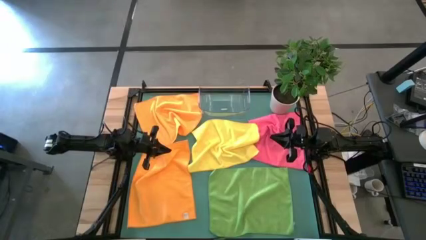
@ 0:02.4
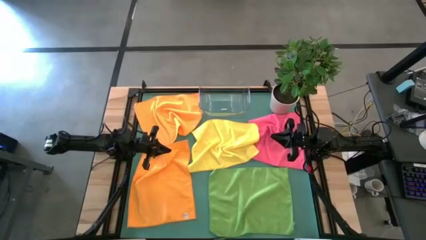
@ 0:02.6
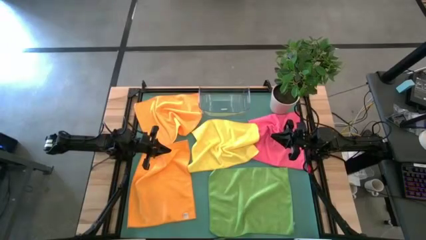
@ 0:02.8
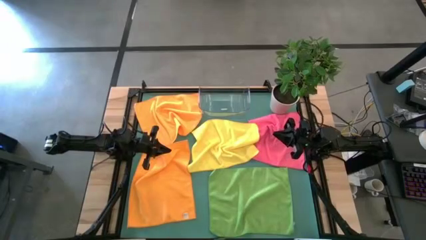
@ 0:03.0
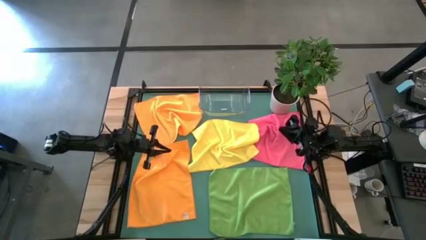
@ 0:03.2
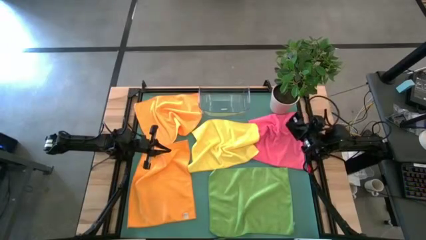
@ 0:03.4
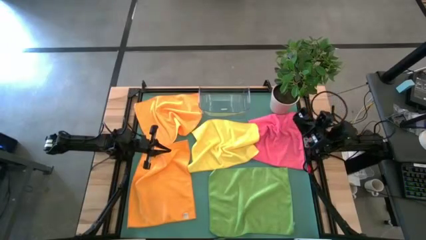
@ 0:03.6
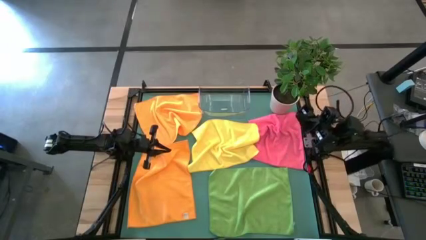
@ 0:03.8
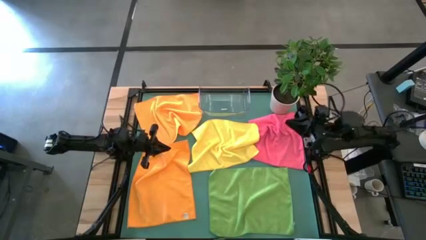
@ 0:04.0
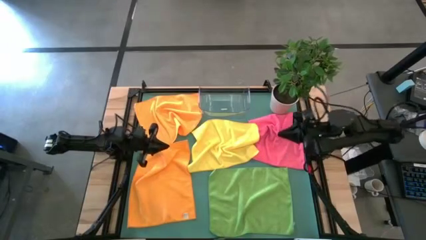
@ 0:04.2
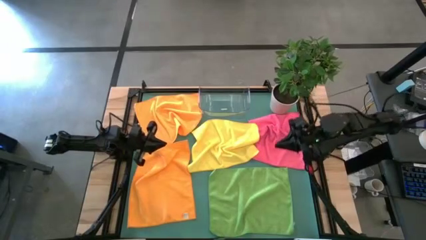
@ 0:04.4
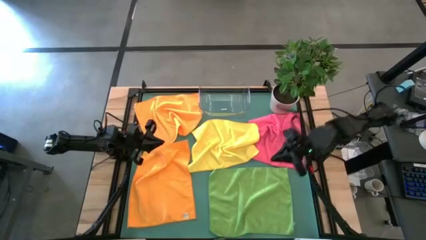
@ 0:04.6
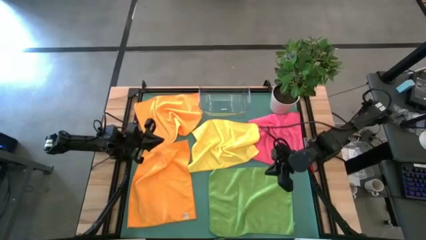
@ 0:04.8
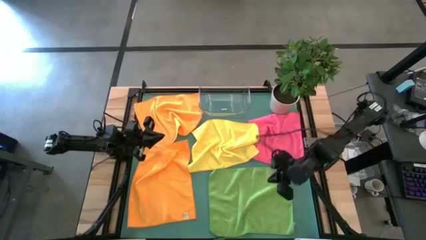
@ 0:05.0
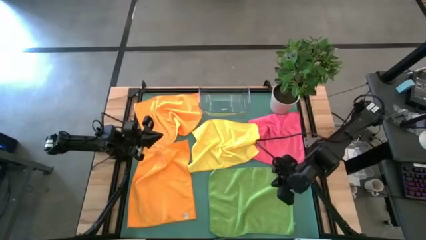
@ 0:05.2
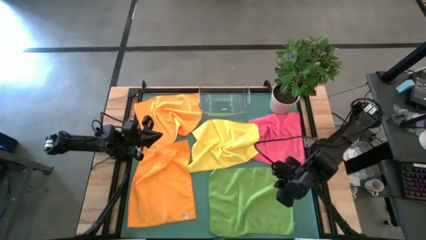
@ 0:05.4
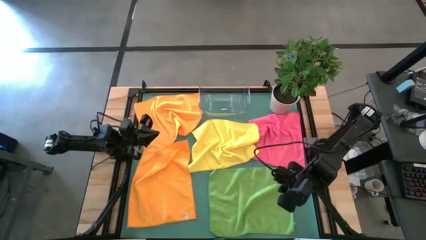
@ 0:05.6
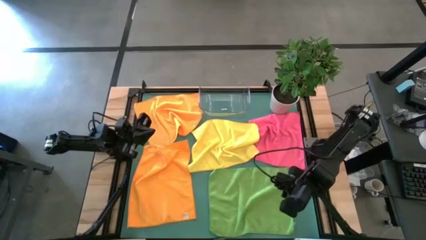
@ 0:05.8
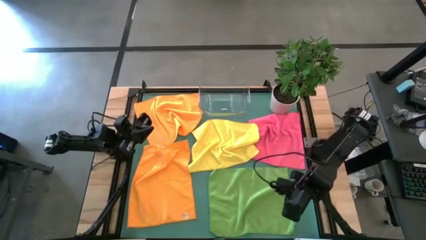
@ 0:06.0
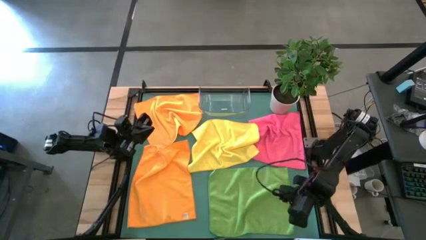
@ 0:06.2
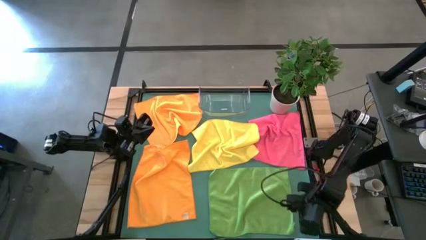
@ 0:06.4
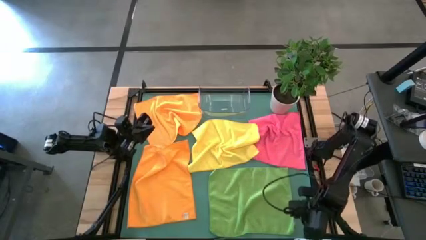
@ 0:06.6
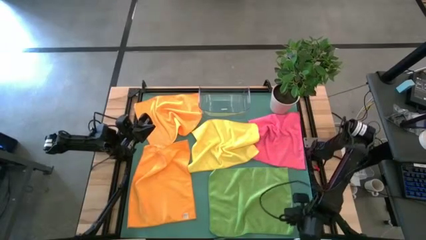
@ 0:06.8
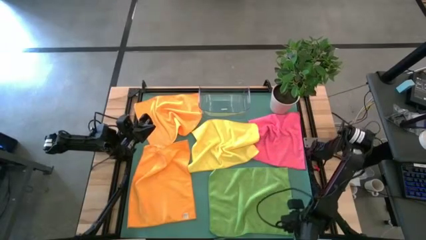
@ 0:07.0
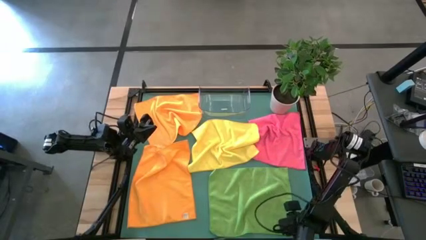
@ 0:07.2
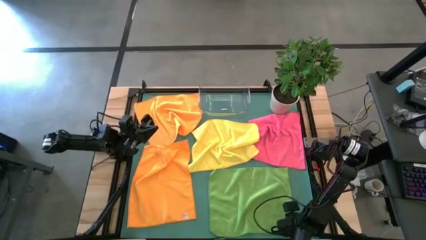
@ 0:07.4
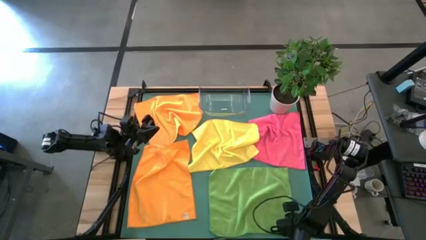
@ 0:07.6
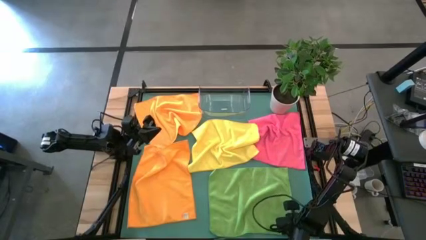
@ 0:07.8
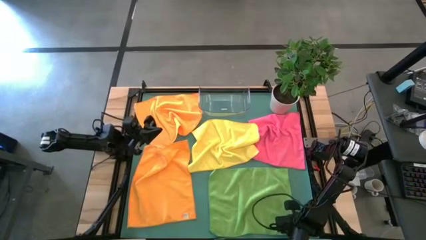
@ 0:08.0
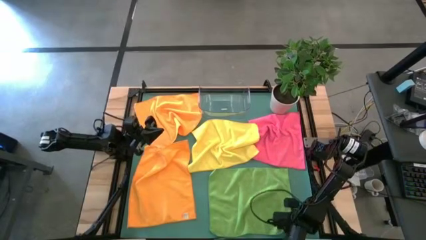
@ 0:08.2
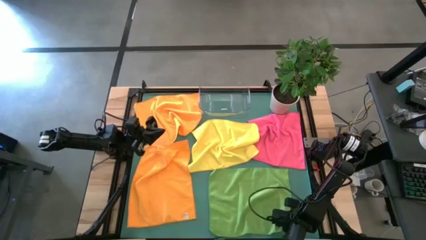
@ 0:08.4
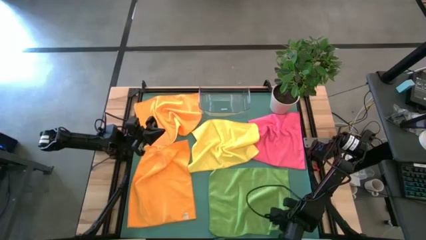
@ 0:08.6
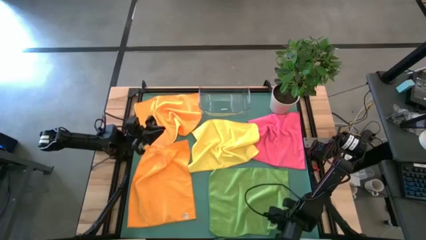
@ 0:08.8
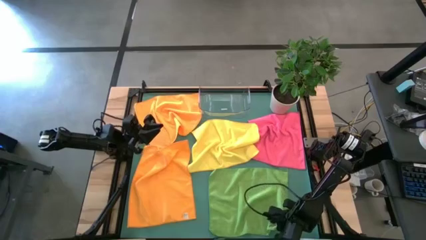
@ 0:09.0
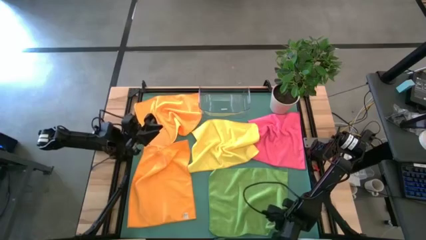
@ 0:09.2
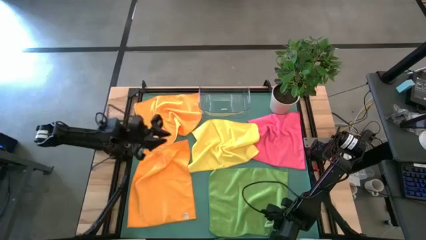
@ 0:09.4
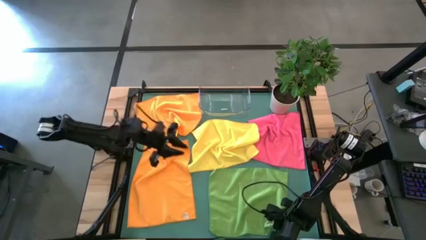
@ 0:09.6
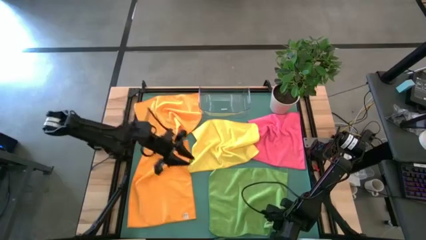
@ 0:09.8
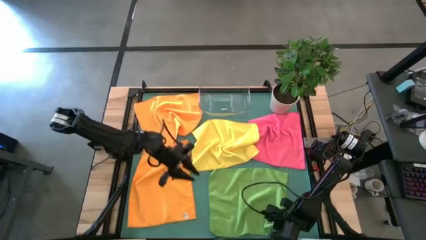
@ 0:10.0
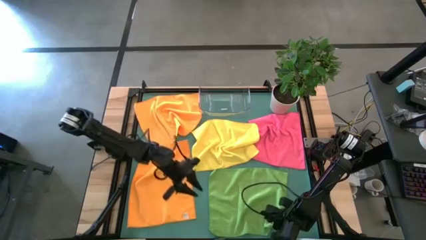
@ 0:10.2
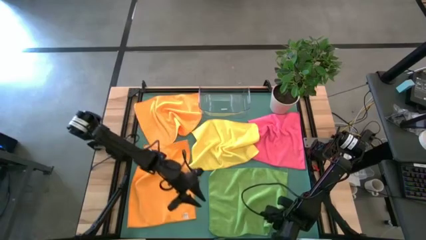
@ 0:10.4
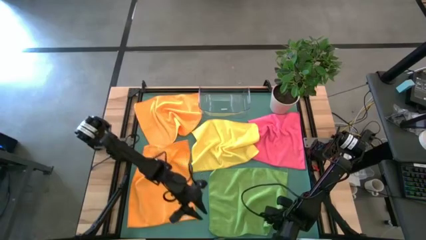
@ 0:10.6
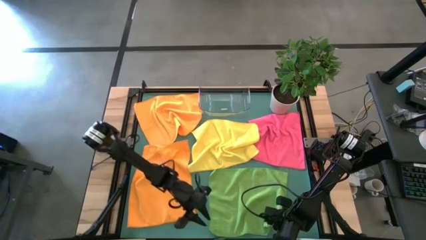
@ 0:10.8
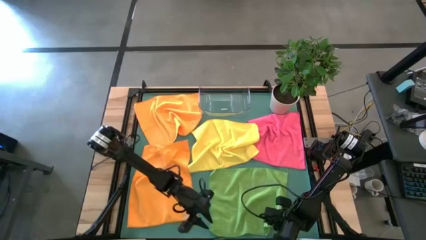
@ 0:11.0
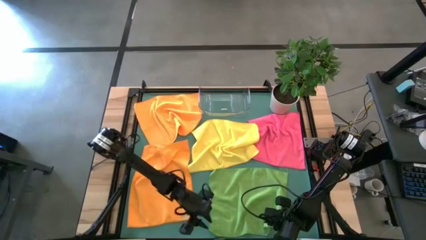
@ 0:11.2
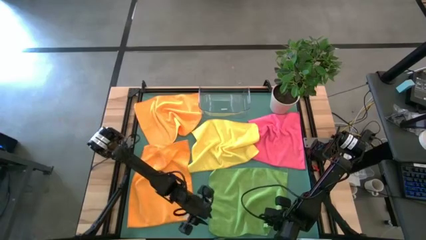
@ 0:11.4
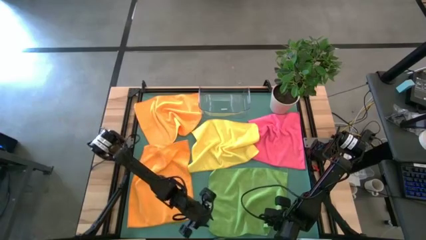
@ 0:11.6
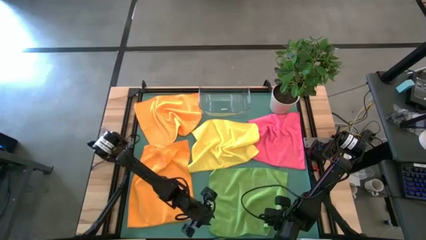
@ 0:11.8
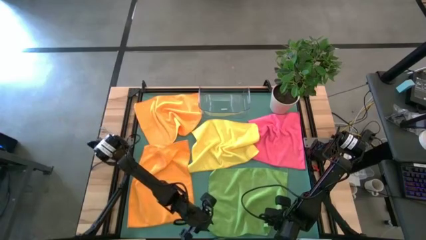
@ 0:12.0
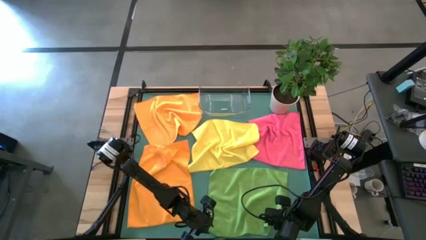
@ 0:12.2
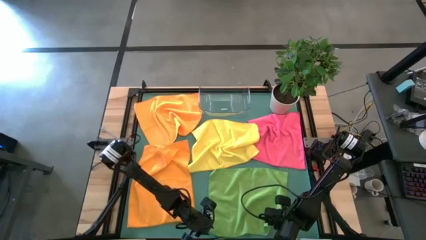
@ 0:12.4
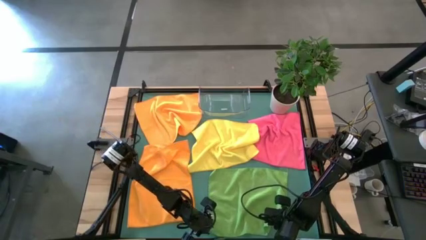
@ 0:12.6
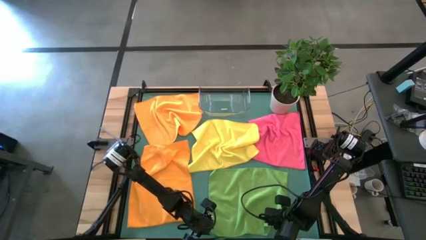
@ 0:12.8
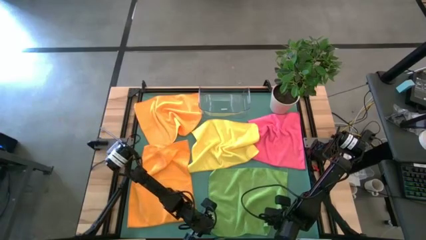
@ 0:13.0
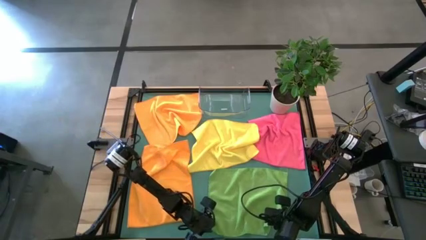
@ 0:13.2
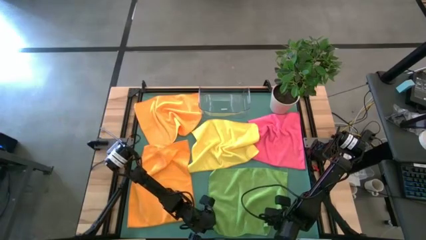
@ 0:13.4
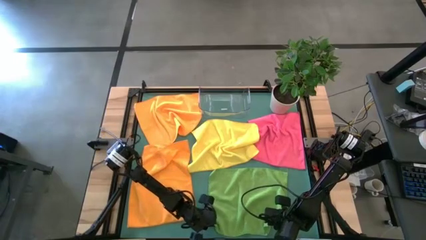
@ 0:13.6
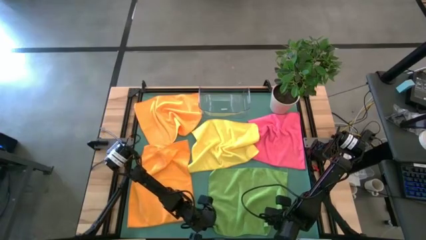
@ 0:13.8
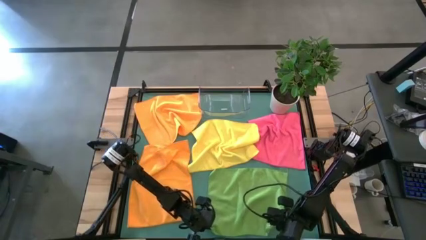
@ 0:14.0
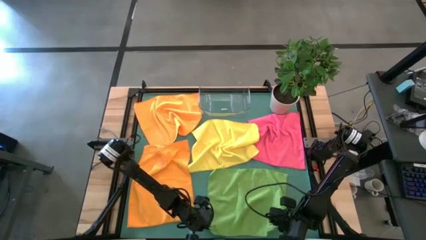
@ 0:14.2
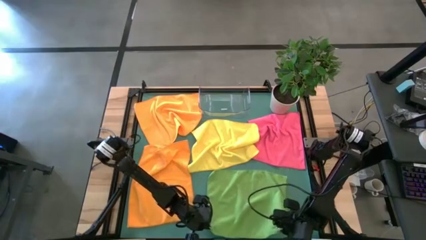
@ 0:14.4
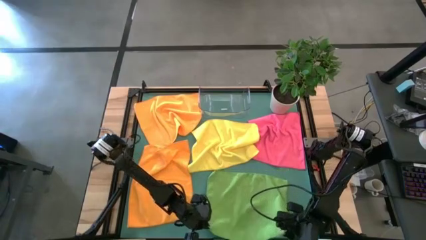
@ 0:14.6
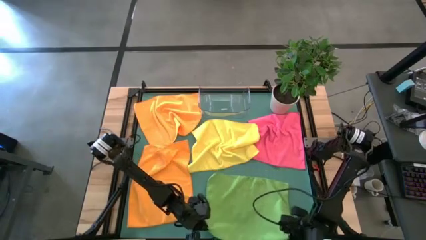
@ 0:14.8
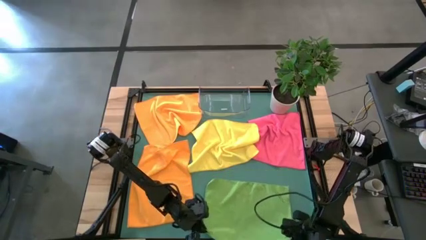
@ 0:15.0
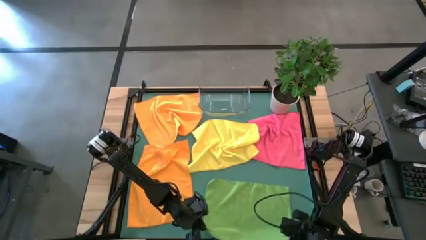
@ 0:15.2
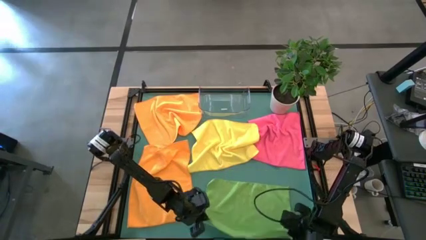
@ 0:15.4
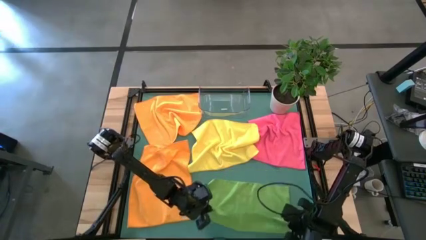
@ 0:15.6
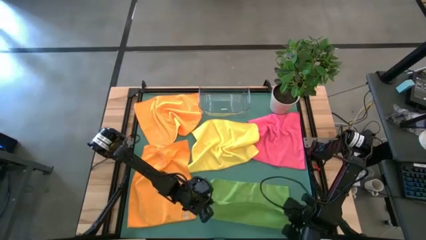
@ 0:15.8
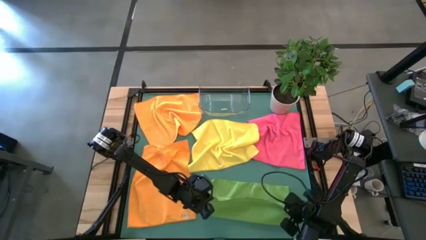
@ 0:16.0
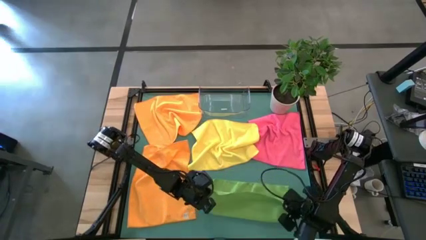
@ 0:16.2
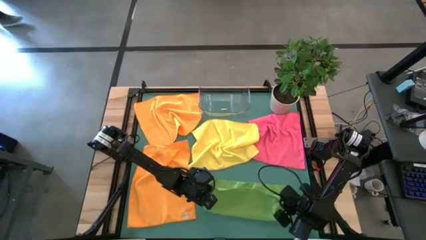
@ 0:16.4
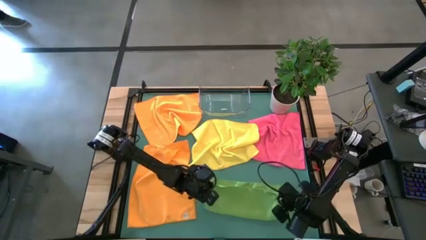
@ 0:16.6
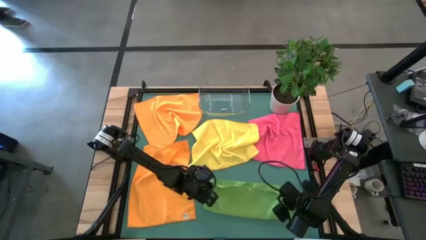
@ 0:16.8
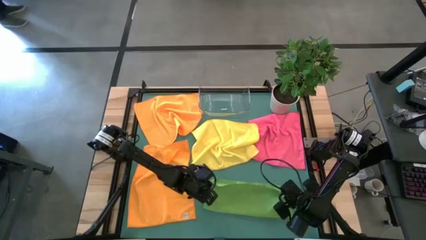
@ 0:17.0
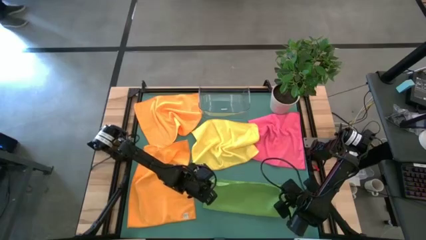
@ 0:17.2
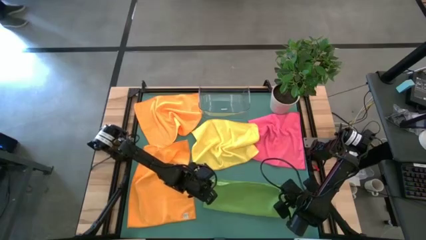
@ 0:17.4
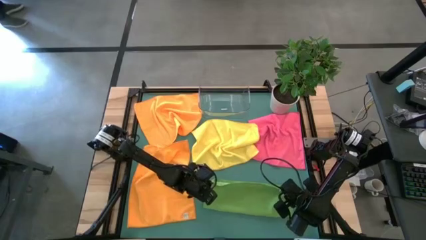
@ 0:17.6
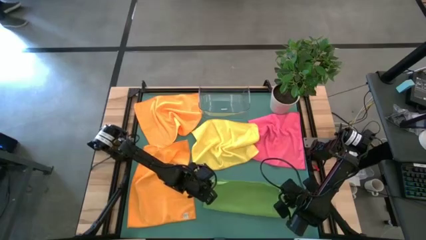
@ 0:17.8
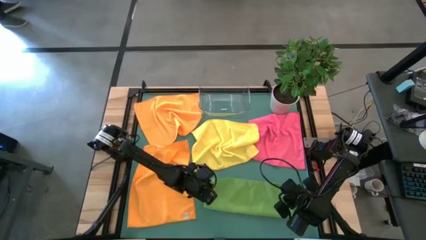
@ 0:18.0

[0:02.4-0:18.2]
Task: Fold microfiber towels
Fold the green towel
